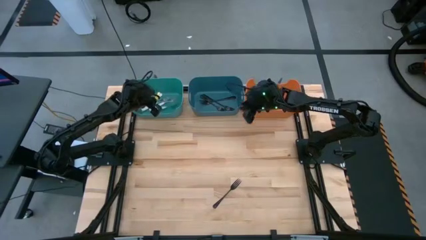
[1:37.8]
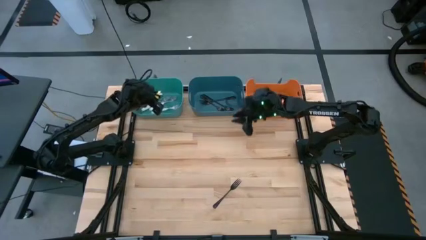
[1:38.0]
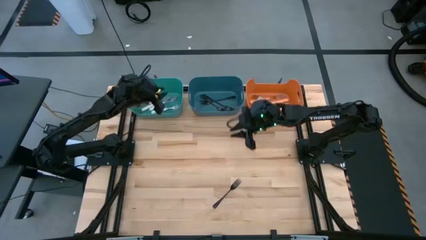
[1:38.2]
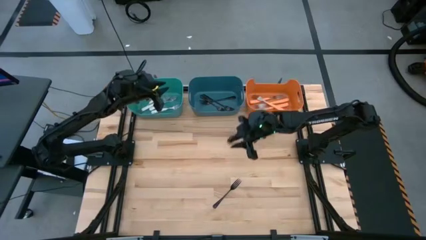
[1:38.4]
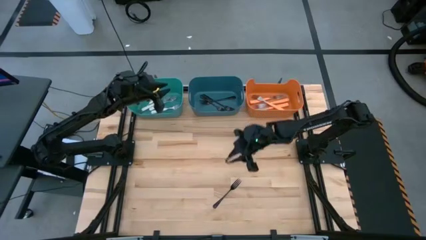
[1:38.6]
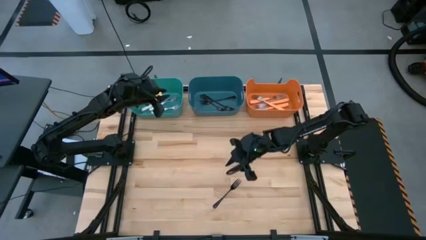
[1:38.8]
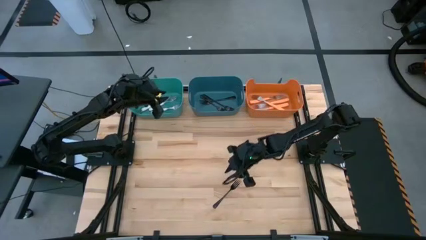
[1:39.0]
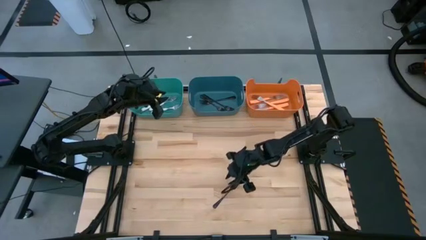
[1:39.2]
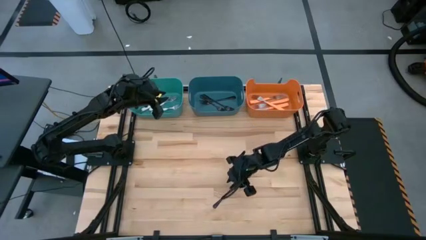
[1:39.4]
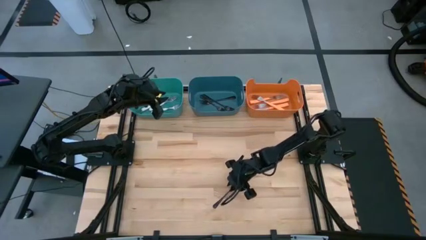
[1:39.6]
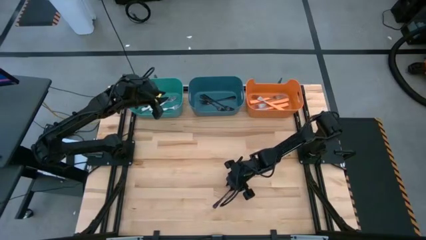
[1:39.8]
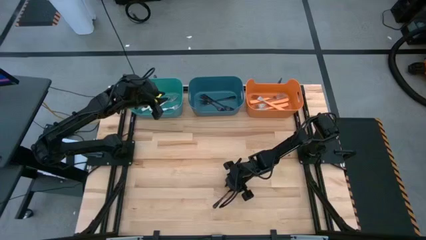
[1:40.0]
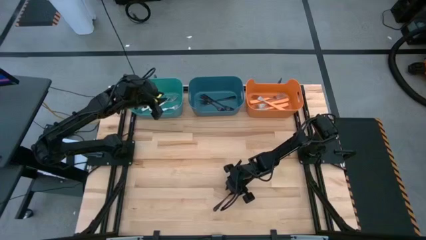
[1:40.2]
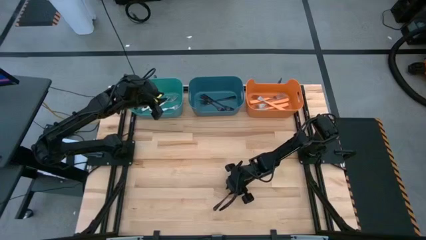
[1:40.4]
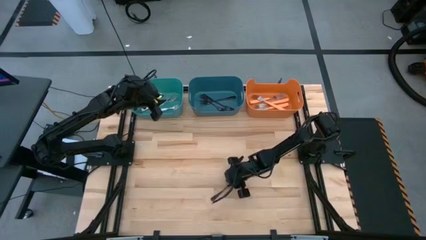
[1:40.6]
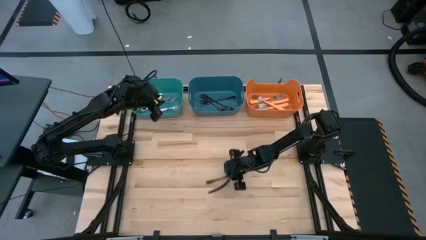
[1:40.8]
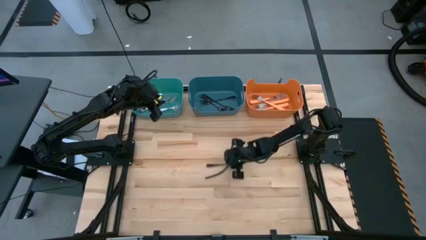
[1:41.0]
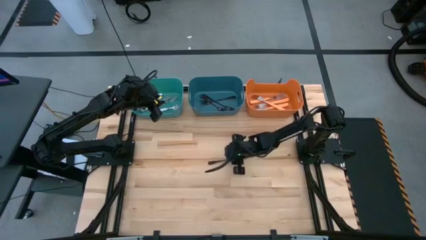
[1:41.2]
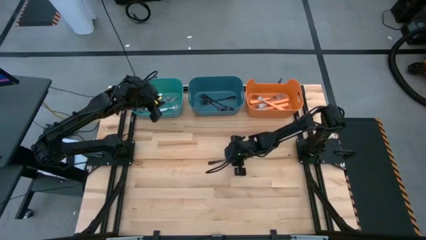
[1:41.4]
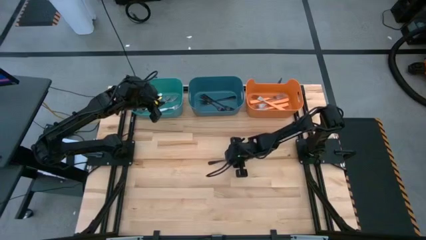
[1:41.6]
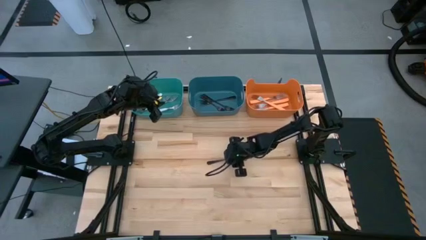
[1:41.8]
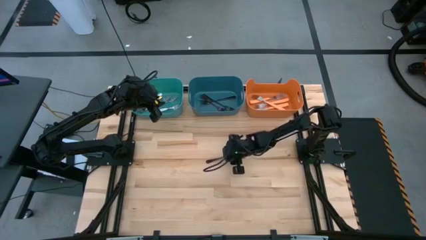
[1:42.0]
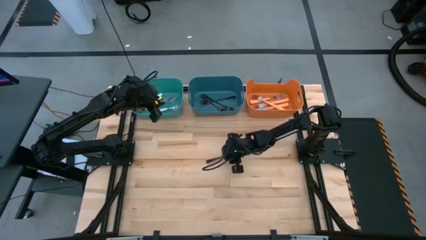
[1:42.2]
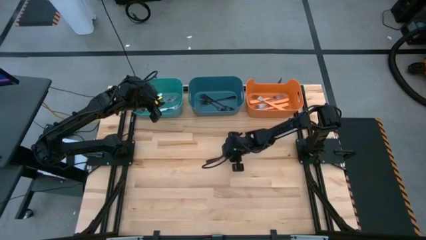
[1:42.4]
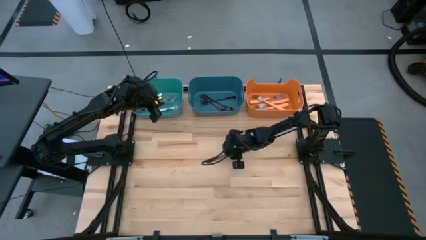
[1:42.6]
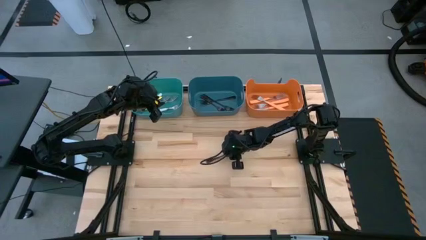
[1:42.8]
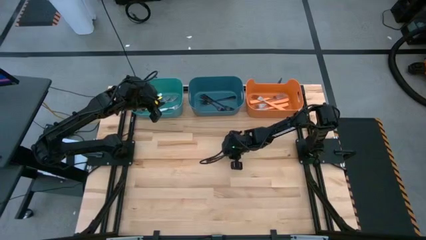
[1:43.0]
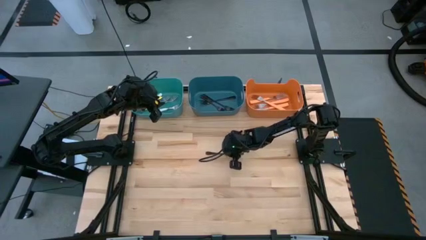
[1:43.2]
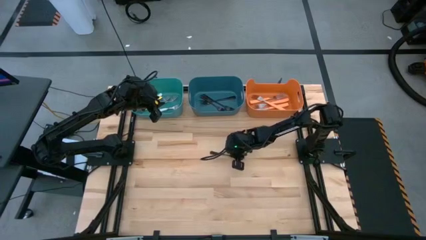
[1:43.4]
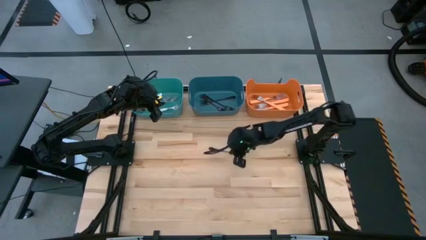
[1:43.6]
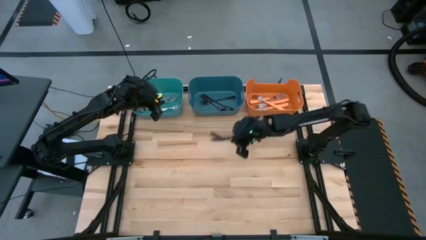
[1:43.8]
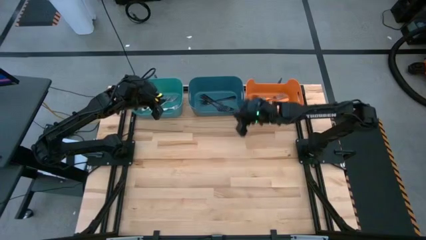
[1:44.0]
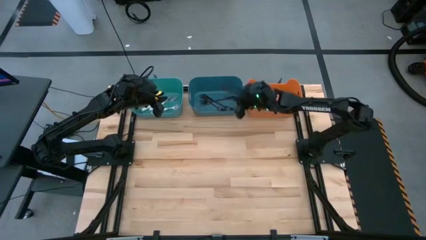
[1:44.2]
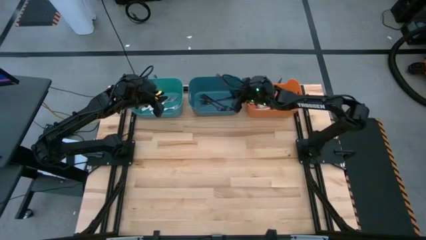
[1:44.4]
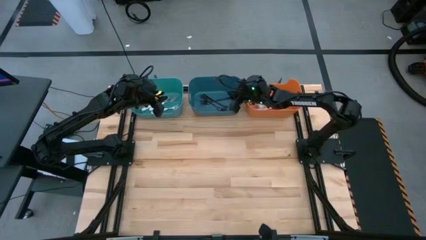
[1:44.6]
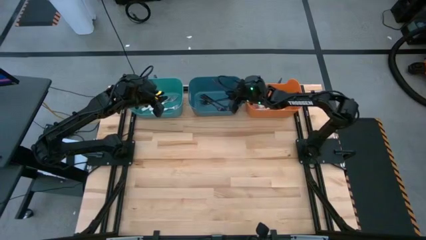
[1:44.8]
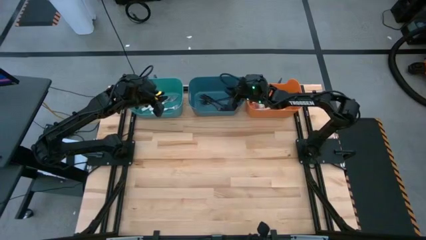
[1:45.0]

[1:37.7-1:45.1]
Task: Sort silverware by color (type)
Put the black fork into the blue bin

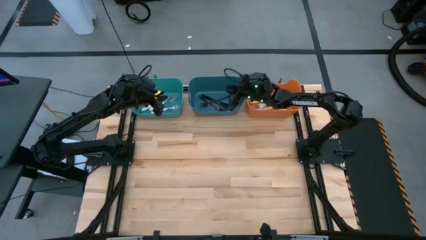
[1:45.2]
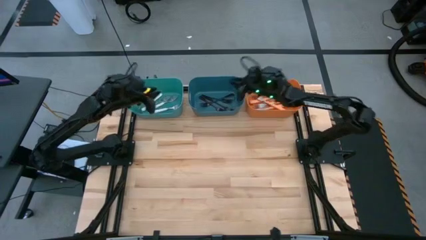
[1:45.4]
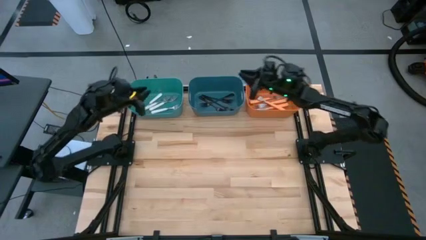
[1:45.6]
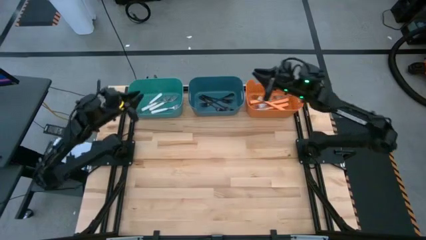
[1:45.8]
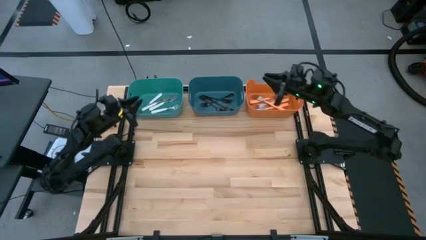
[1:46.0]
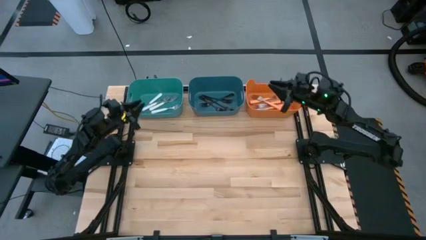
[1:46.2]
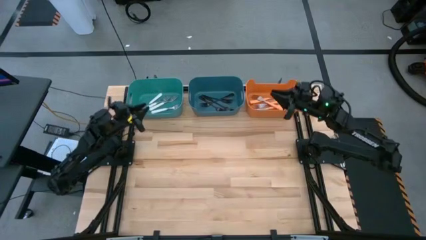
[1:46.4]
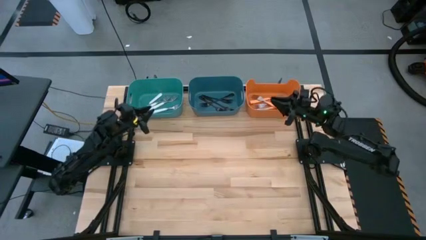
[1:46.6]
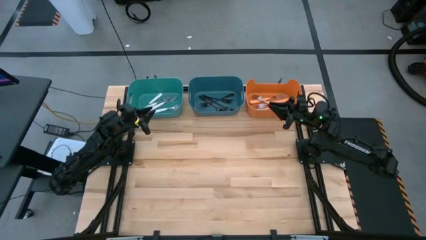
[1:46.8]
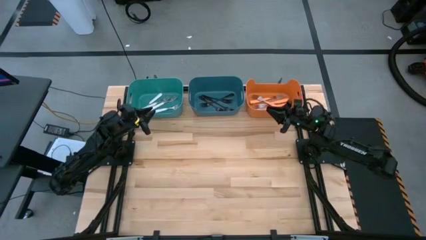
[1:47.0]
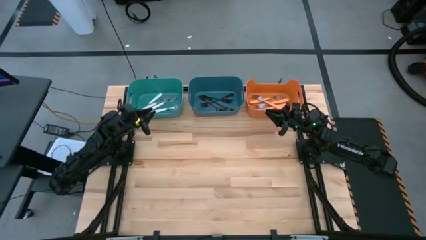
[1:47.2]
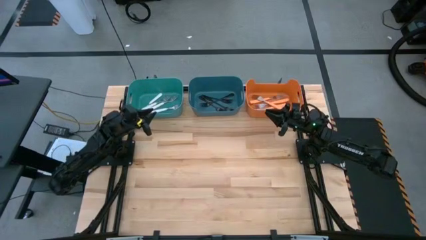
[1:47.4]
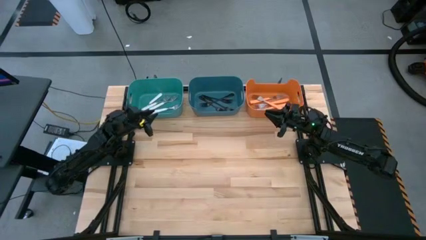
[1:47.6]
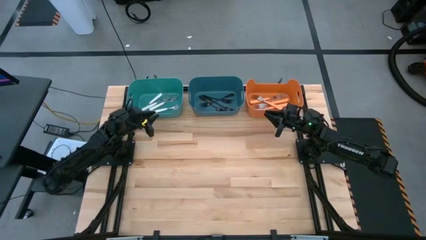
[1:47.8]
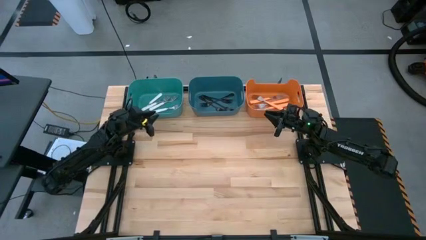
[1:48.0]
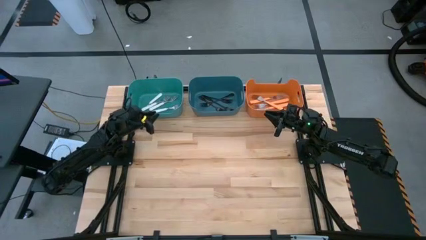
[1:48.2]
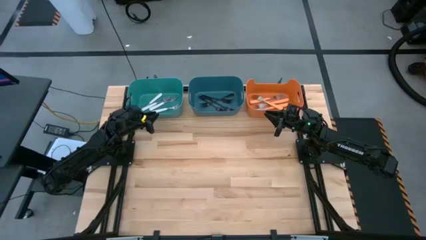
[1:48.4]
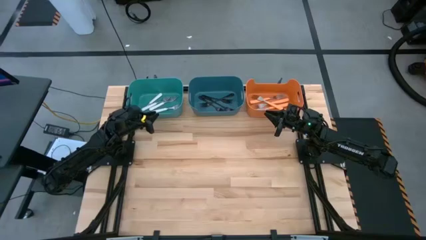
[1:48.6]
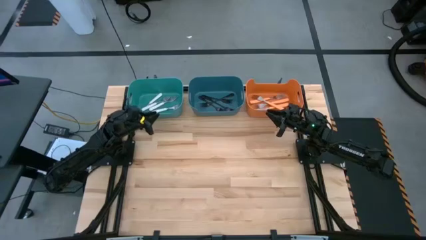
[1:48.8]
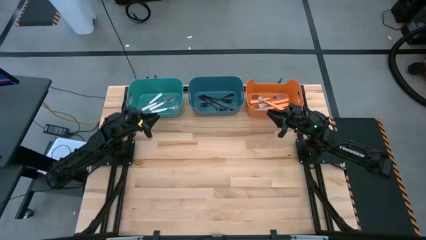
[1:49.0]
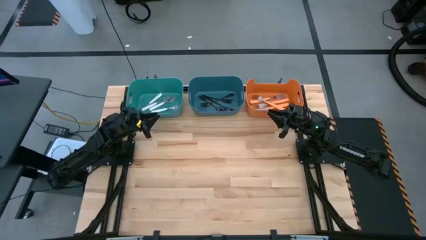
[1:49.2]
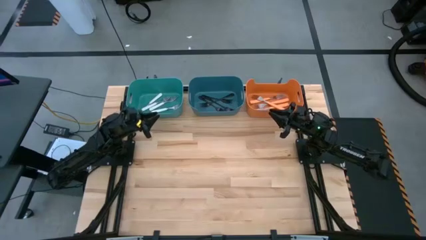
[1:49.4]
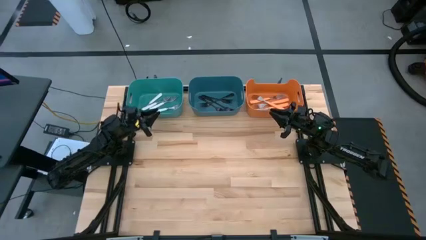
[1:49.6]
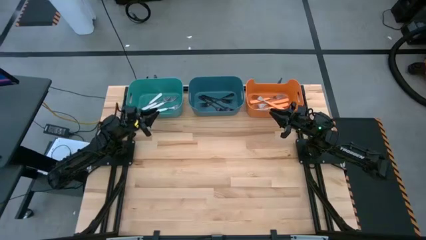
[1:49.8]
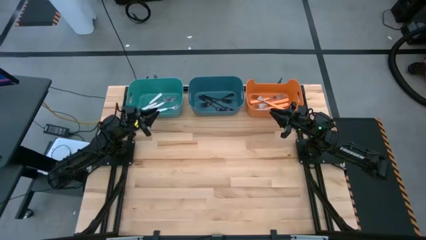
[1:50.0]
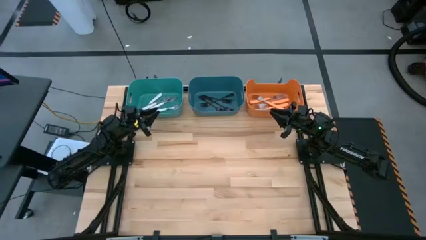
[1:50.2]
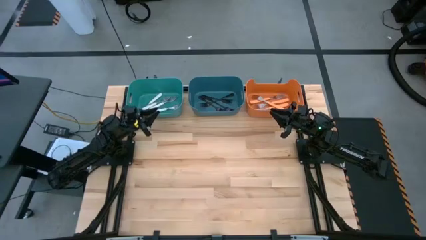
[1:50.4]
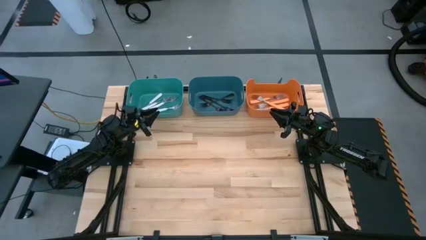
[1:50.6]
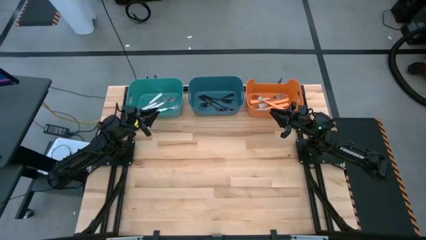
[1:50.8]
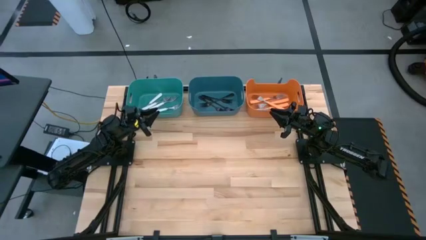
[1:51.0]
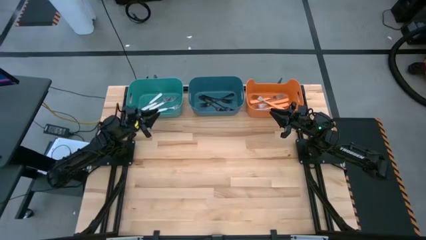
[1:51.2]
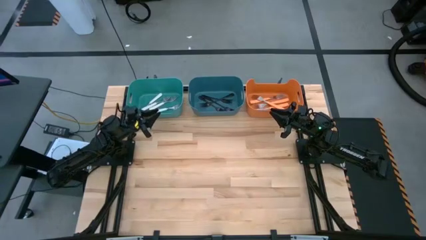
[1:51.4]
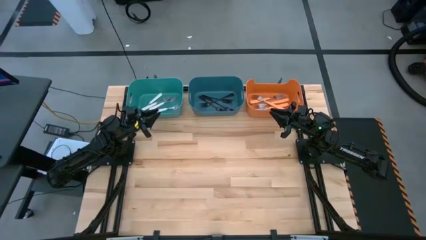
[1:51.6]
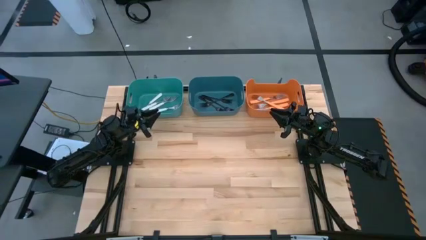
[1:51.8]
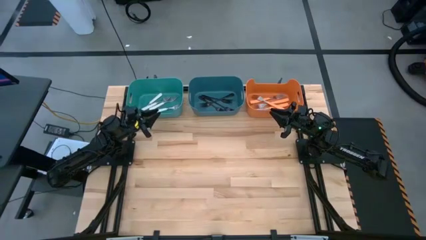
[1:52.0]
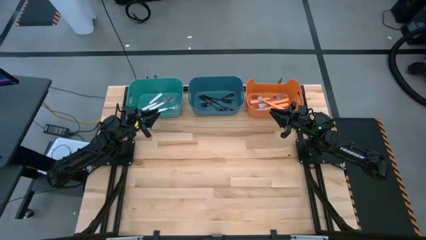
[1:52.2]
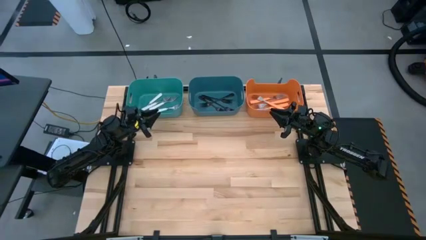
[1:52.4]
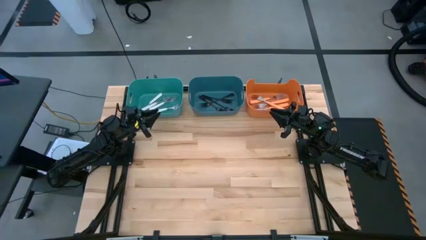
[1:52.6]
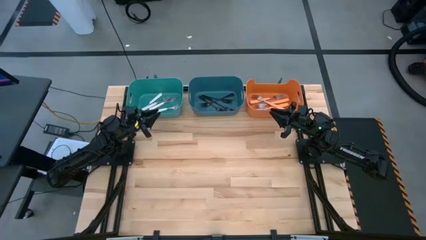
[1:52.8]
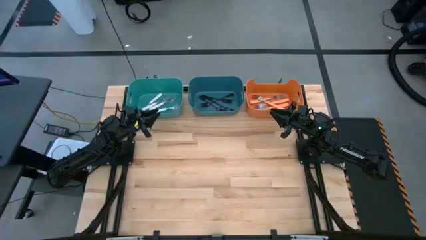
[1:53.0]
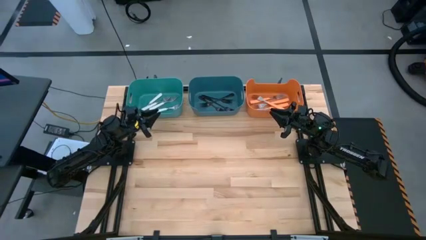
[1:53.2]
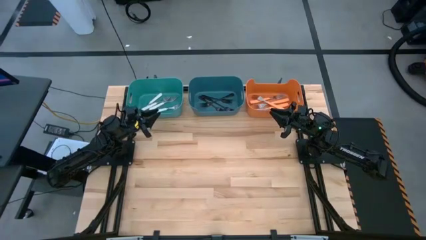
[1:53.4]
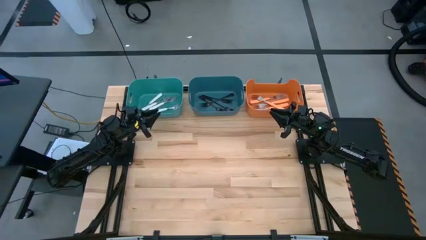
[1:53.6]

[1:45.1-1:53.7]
Return to Home Position
